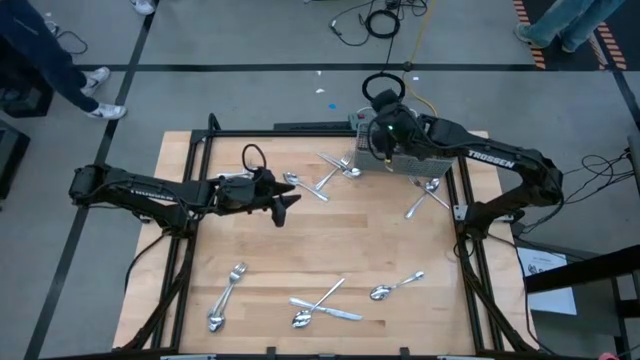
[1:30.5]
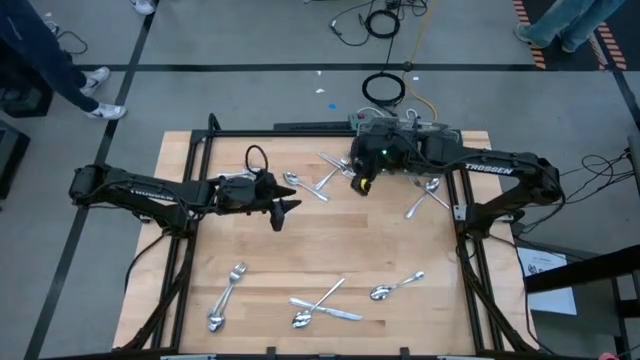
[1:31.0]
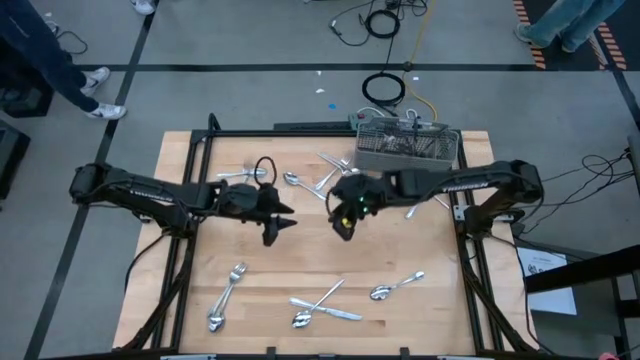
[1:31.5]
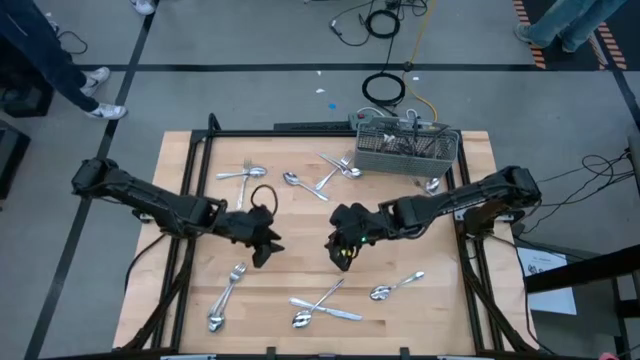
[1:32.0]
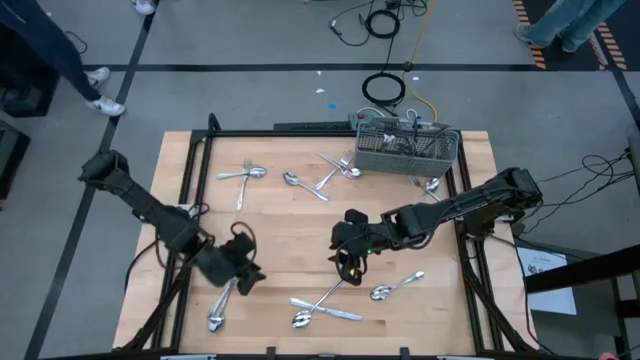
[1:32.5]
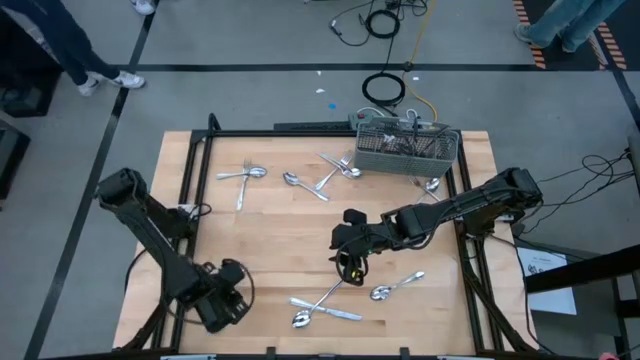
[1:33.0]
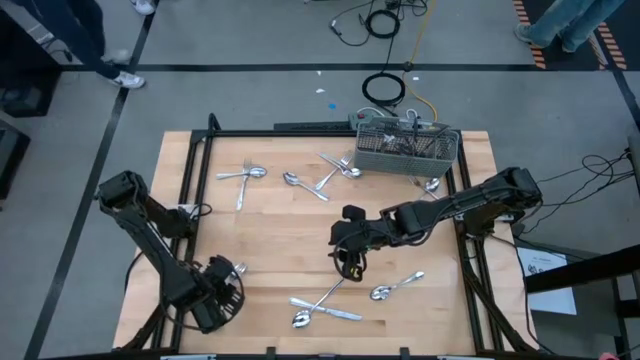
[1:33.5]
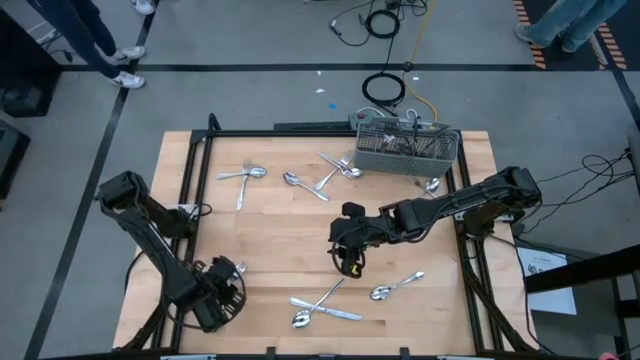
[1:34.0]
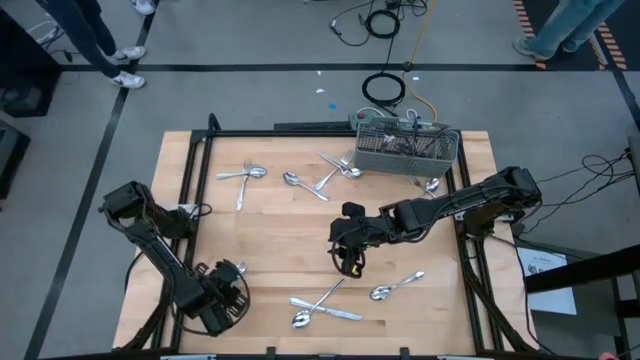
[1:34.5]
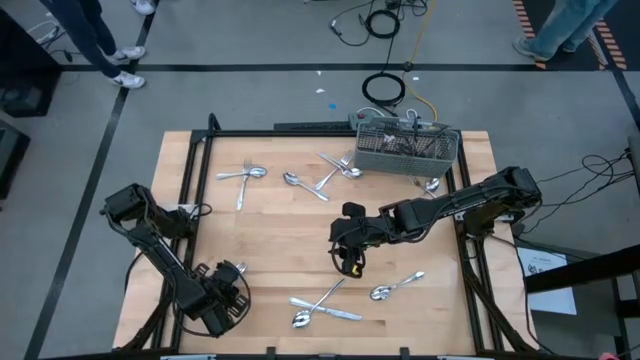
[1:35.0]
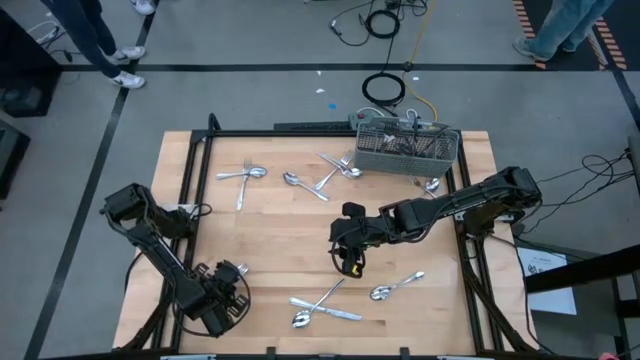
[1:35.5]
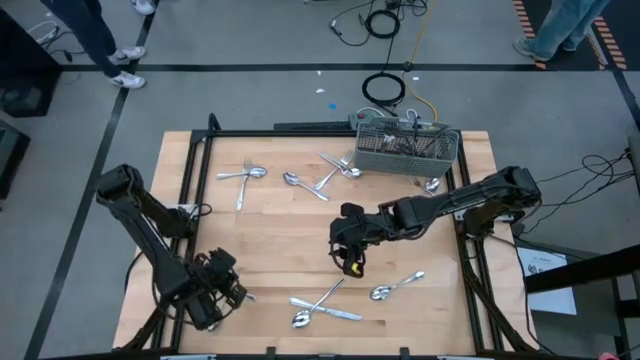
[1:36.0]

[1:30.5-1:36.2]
Task: Sort silverware
Put the silver fork into the gray utensil holder

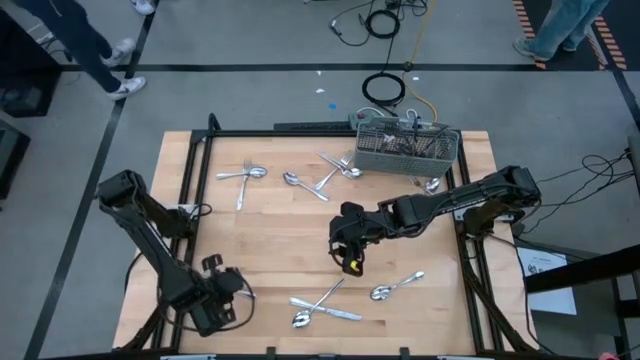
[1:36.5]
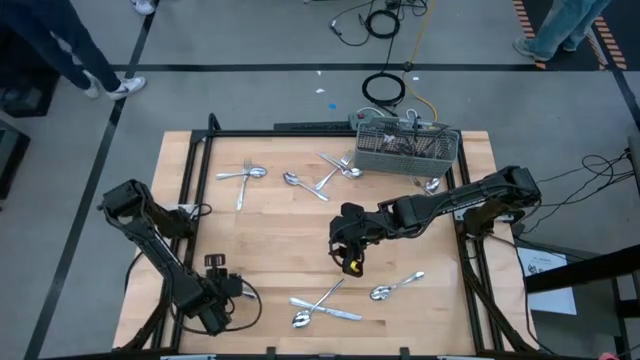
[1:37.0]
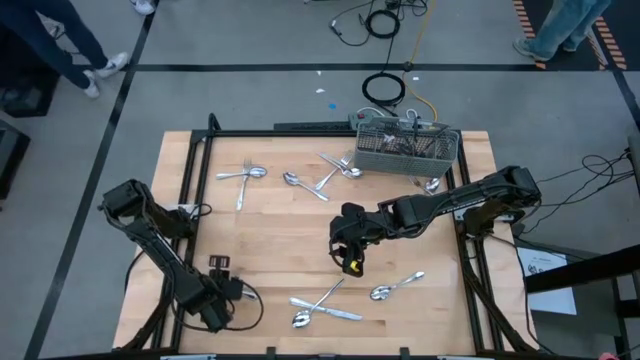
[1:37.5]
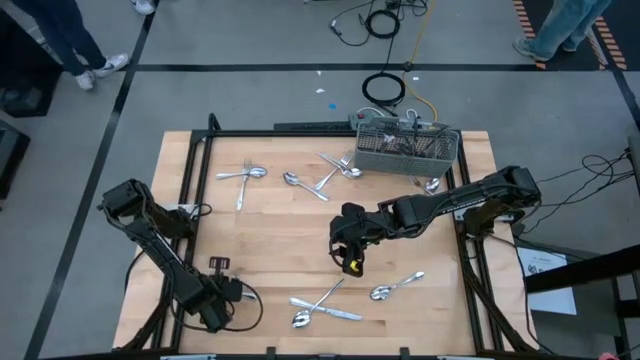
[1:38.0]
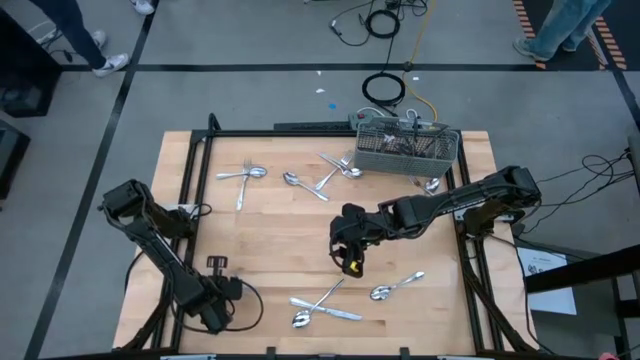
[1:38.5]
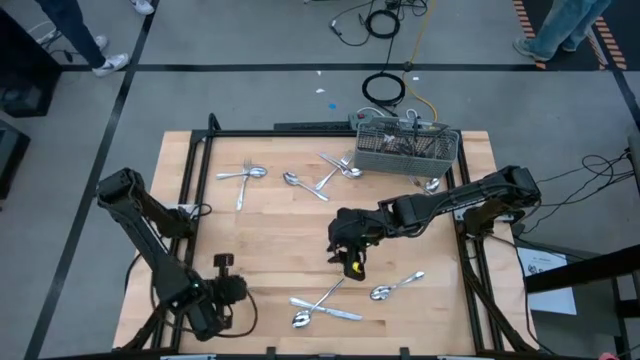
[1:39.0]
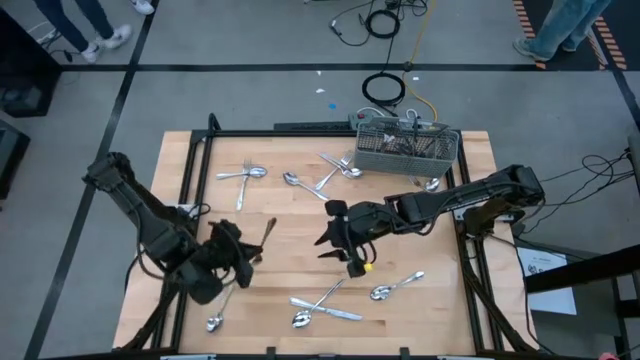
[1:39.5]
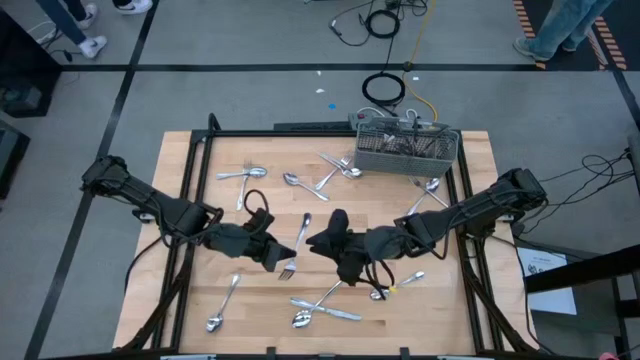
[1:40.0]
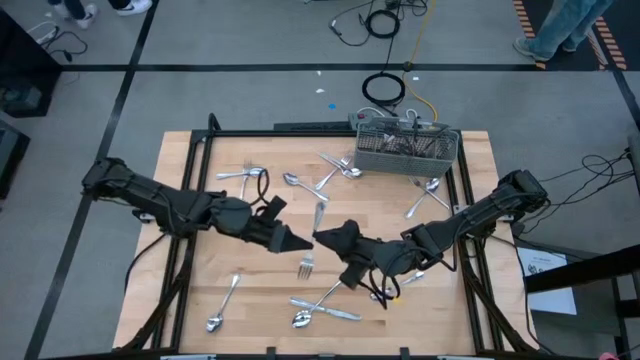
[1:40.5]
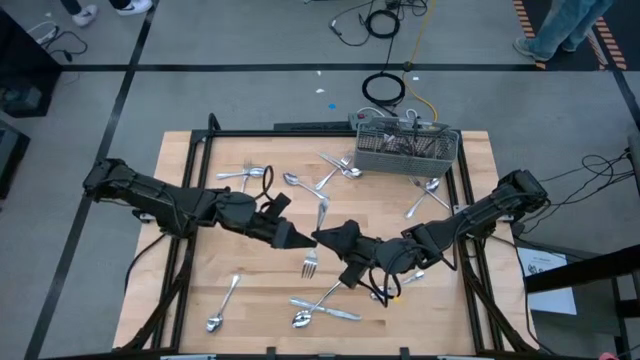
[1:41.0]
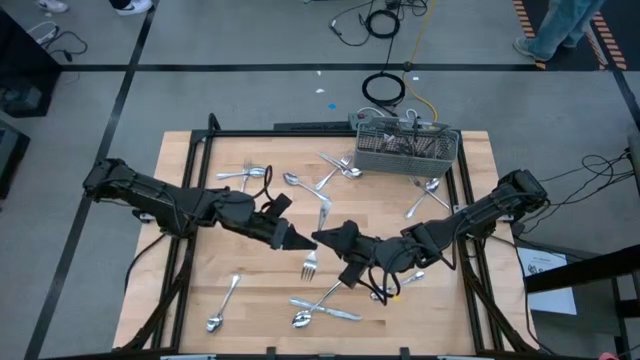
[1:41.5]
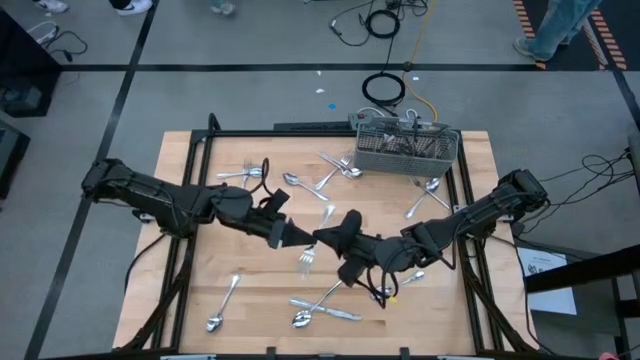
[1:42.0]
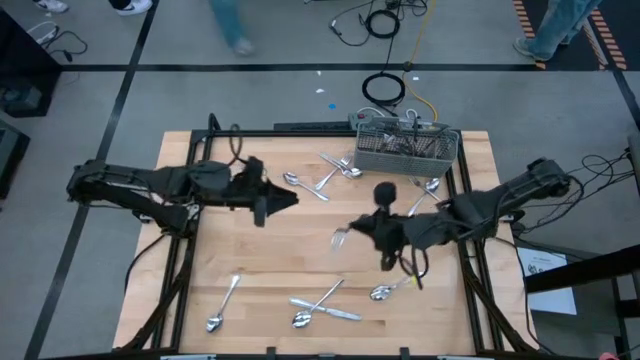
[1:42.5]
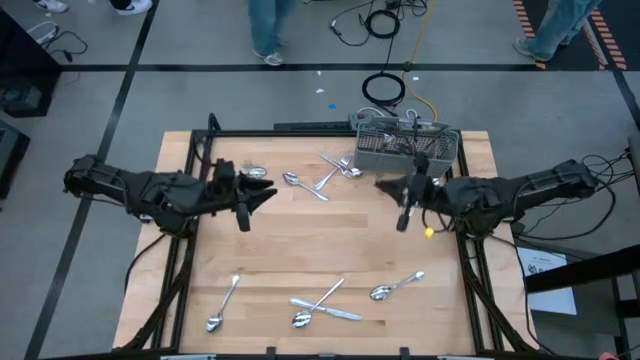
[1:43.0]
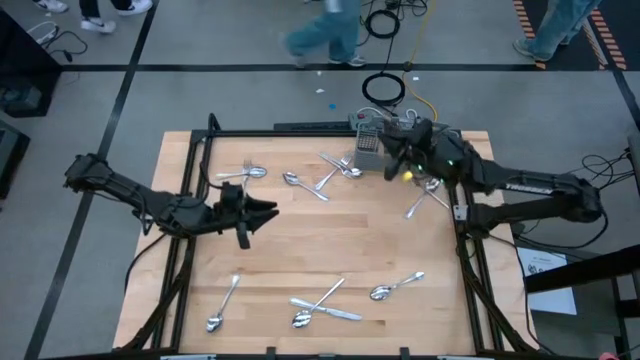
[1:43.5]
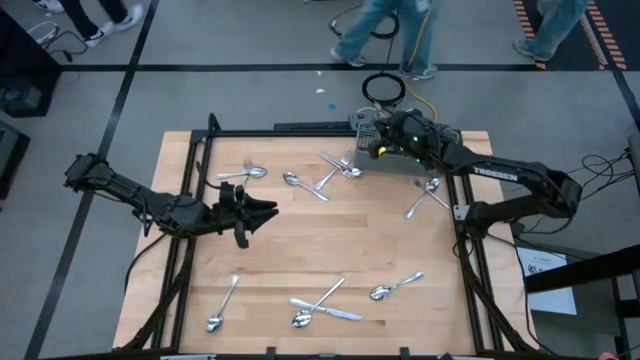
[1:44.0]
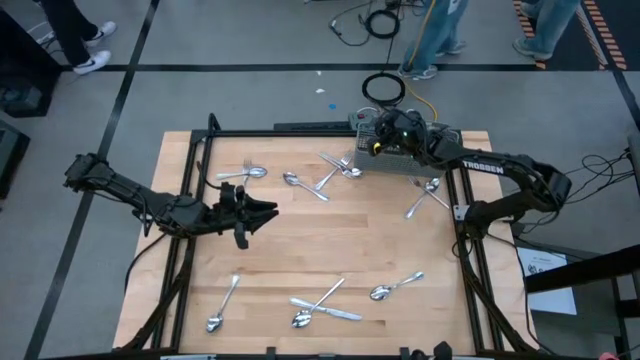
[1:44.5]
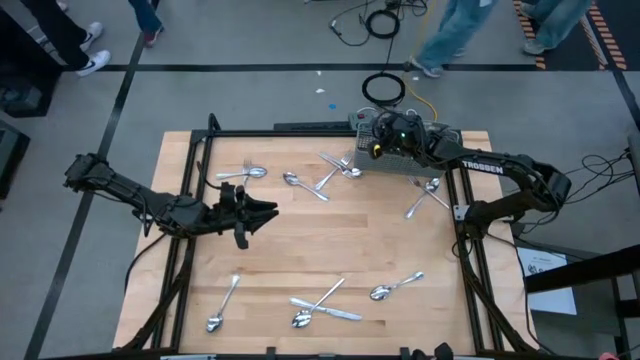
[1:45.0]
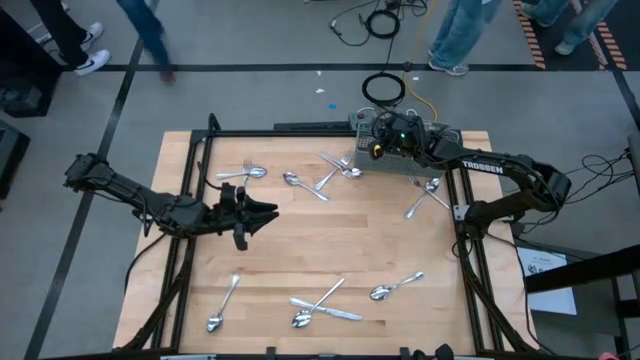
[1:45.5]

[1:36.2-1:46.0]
Put the silver fork into the gray utensil holder

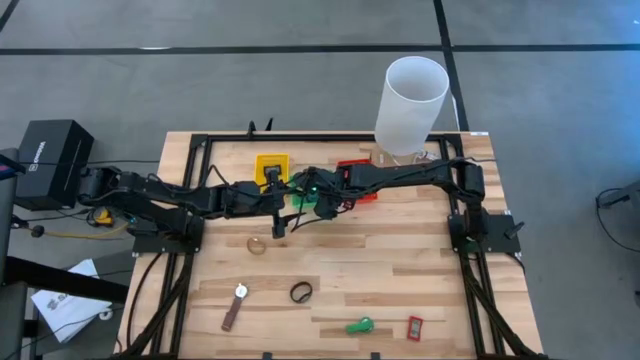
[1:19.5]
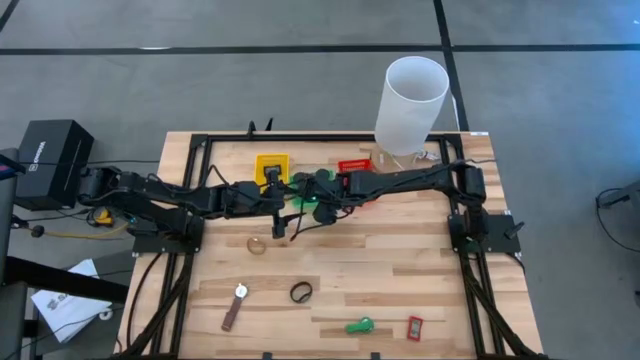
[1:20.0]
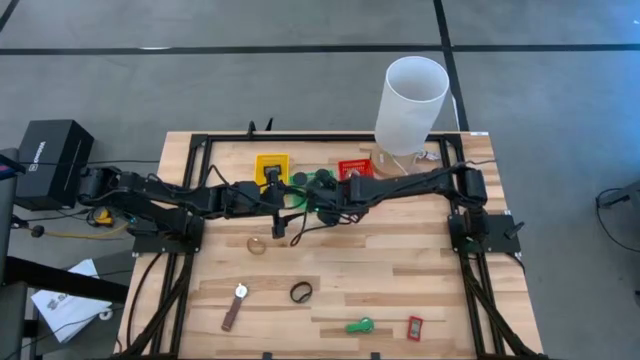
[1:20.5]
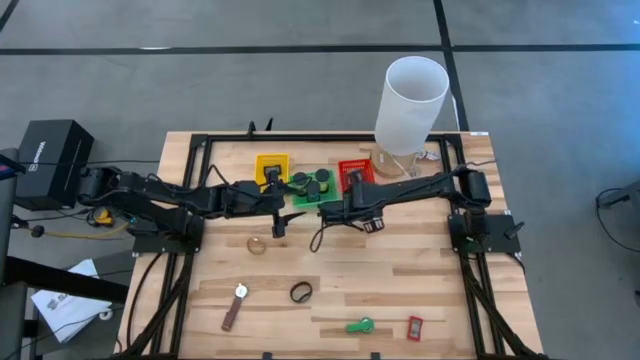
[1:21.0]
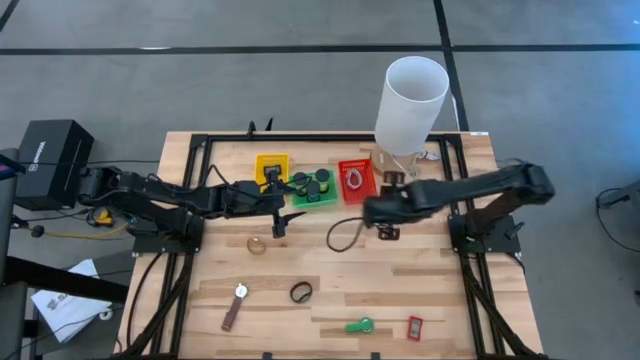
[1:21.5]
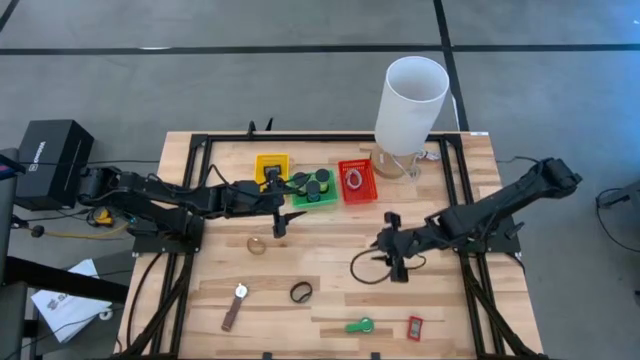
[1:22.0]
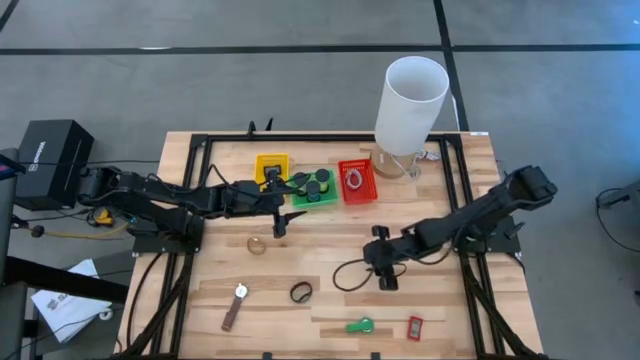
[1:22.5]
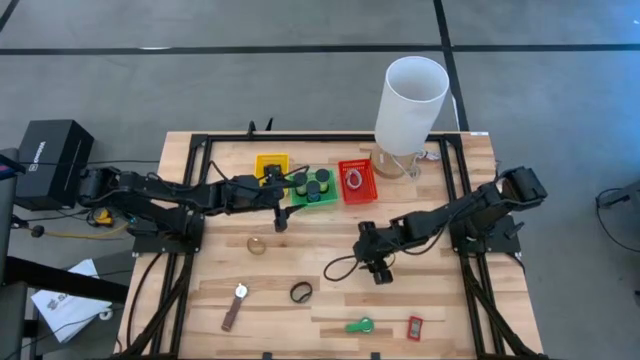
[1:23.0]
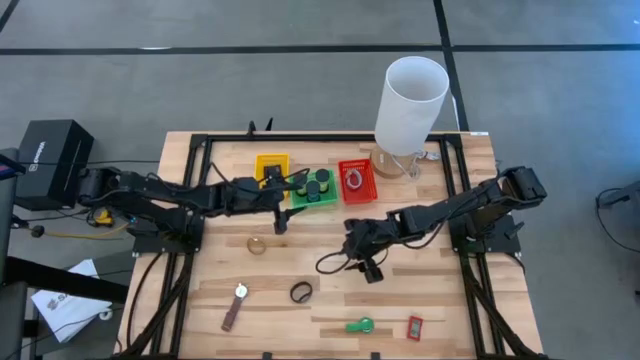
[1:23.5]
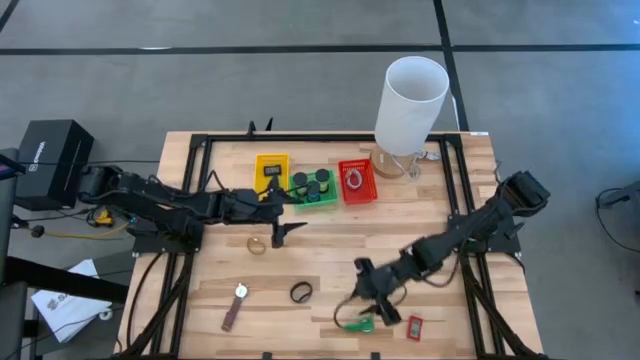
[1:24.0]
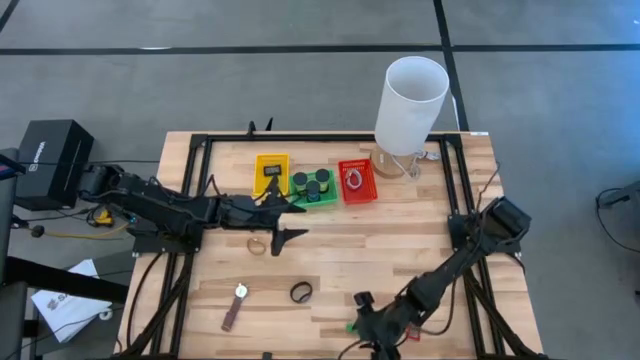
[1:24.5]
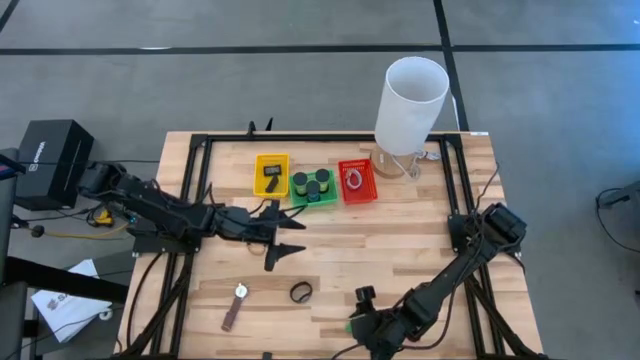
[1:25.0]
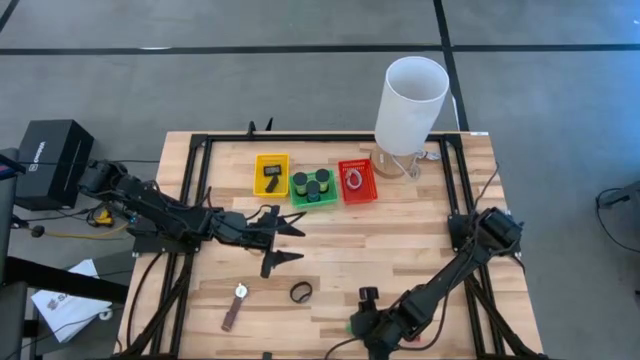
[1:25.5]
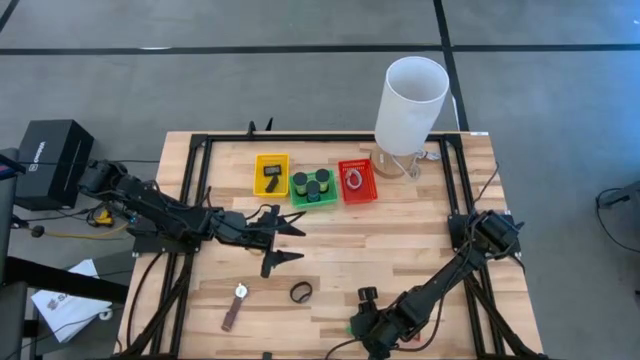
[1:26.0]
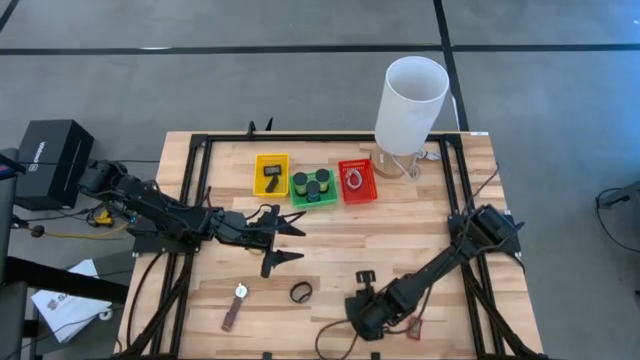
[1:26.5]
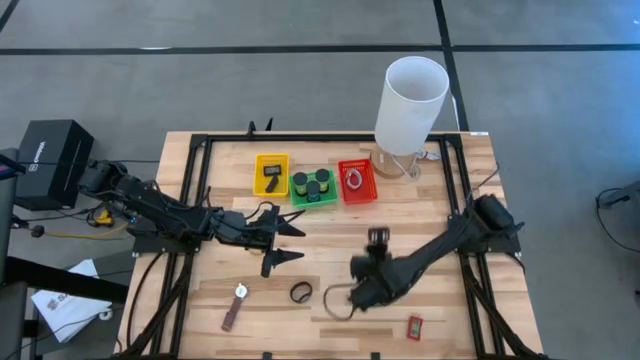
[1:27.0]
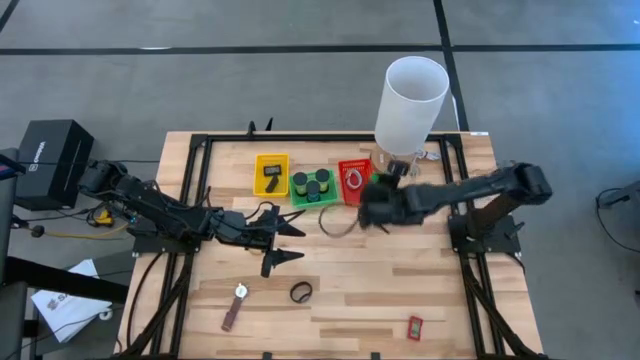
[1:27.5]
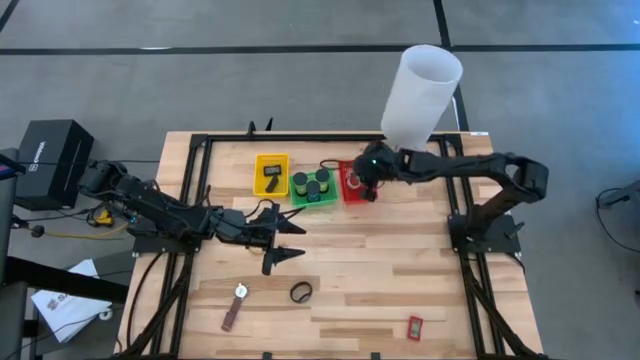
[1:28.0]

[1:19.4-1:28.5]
Task: Pick & Place Office items
Put the green wrist watch into the red basket
